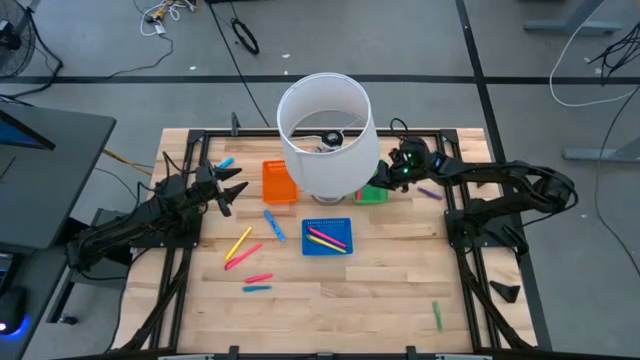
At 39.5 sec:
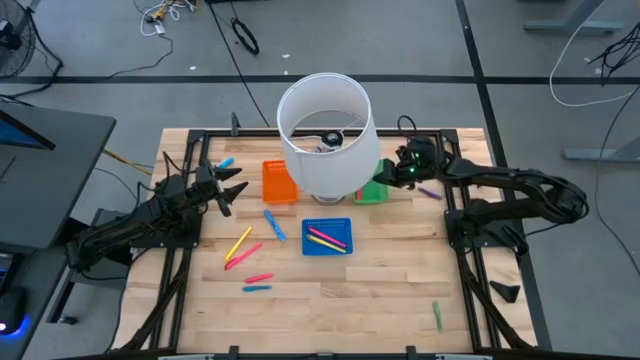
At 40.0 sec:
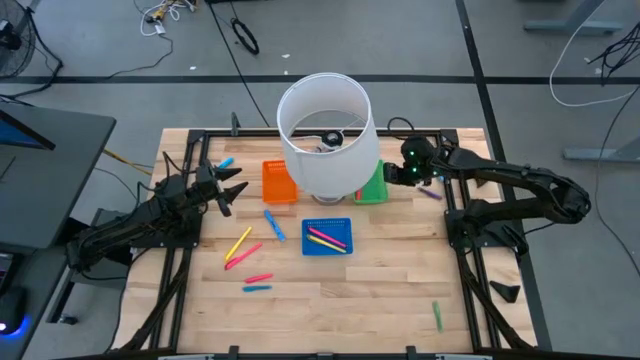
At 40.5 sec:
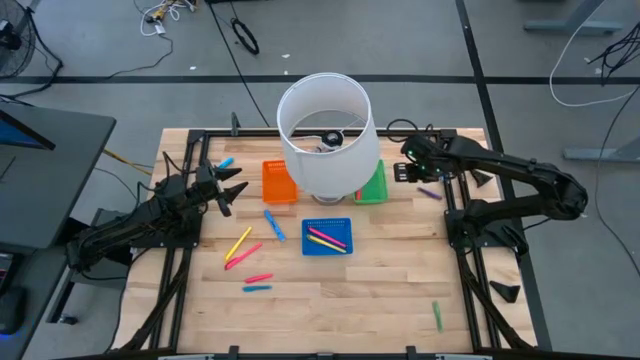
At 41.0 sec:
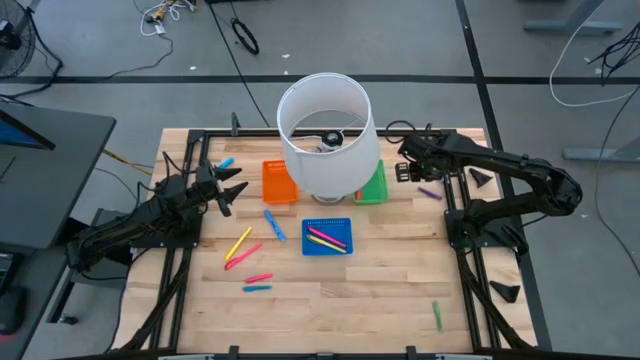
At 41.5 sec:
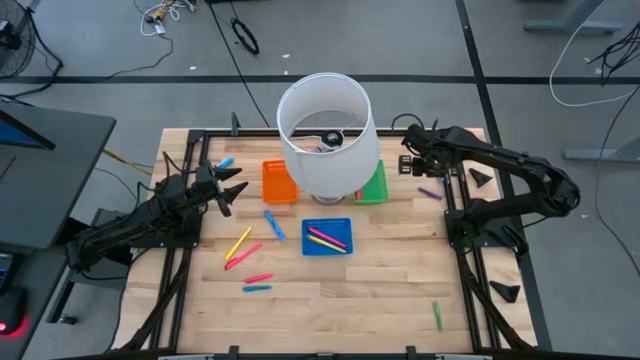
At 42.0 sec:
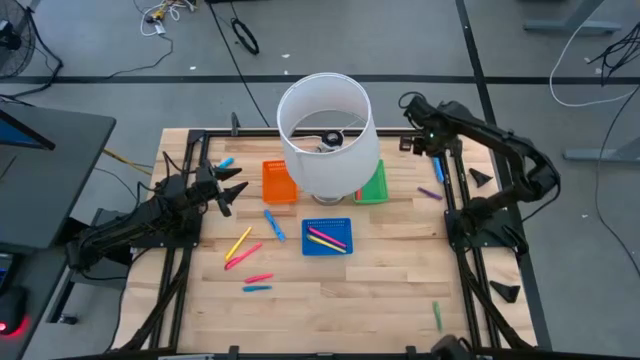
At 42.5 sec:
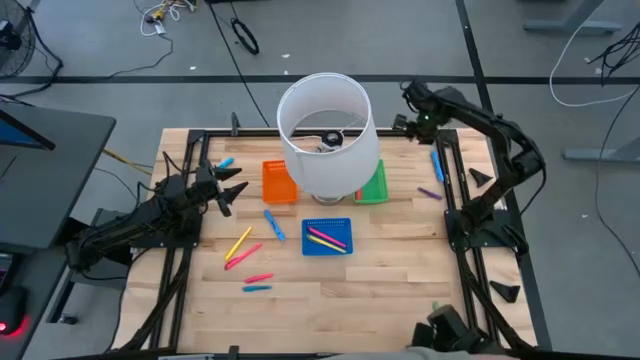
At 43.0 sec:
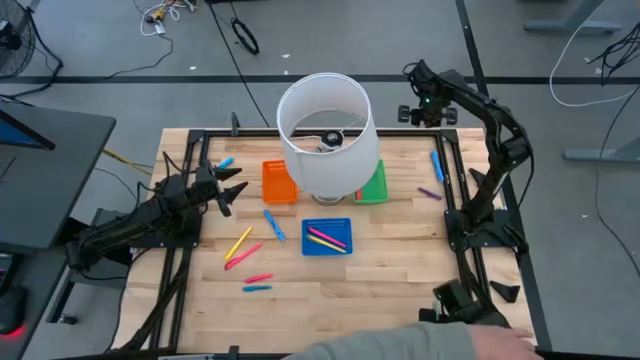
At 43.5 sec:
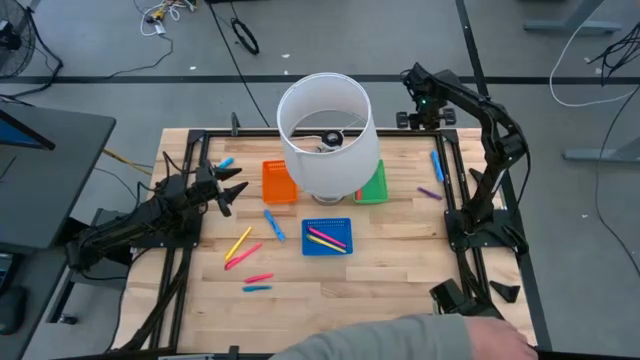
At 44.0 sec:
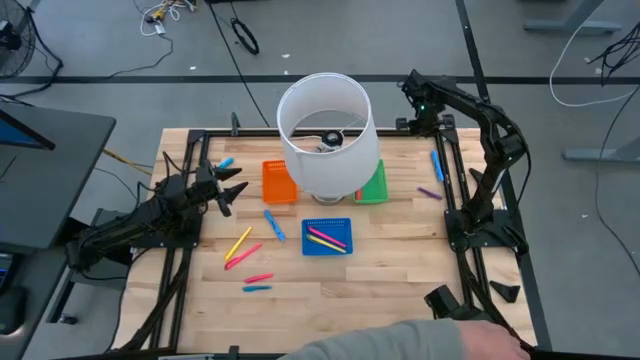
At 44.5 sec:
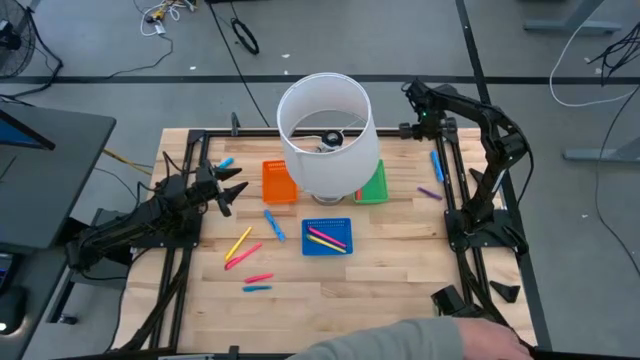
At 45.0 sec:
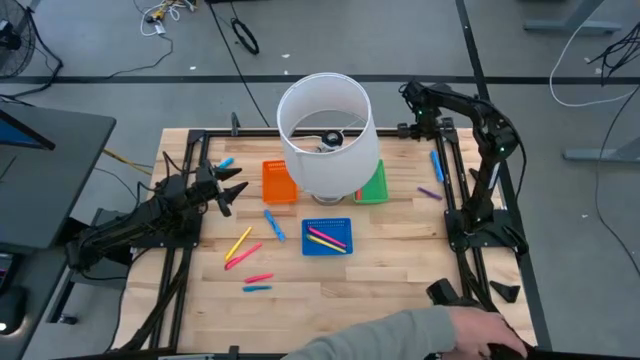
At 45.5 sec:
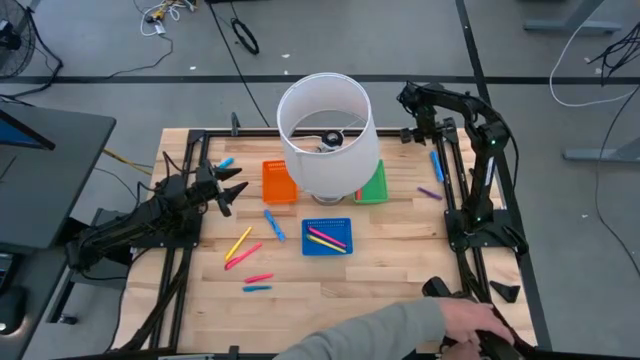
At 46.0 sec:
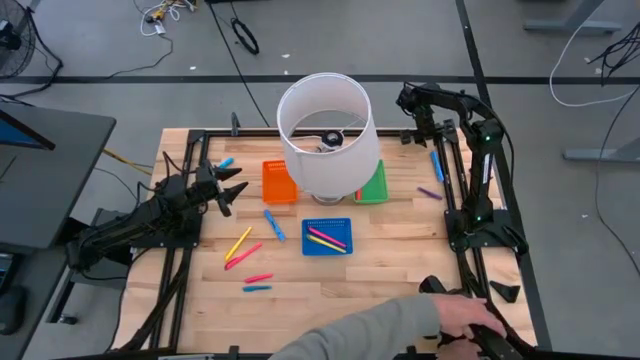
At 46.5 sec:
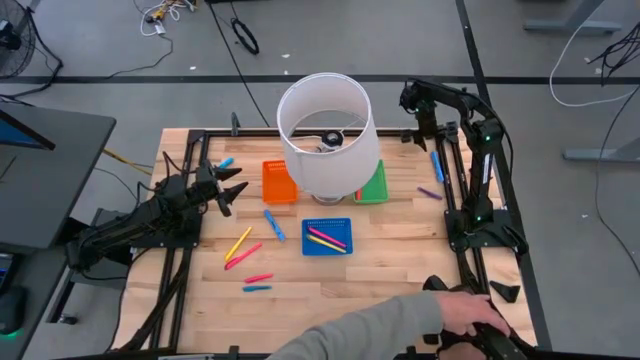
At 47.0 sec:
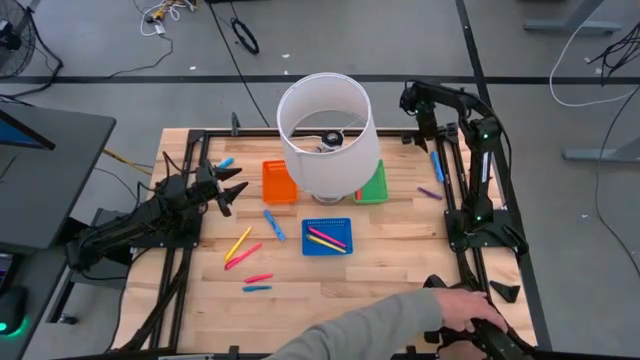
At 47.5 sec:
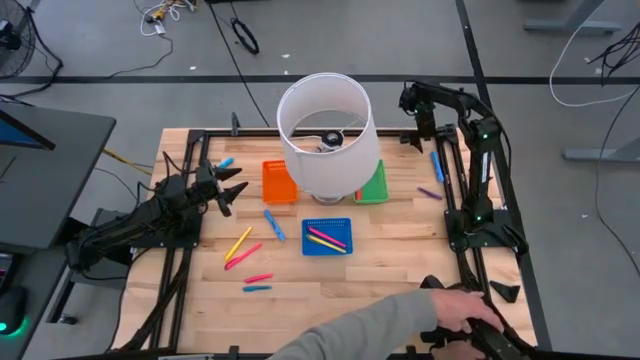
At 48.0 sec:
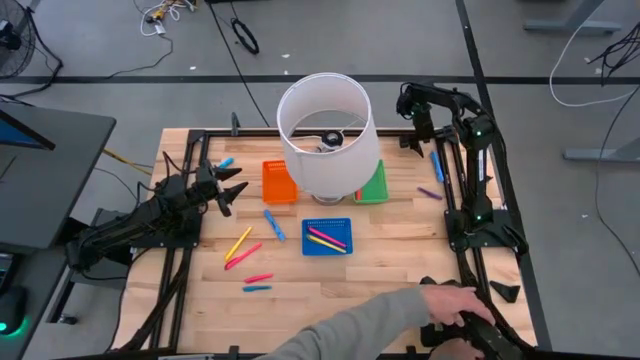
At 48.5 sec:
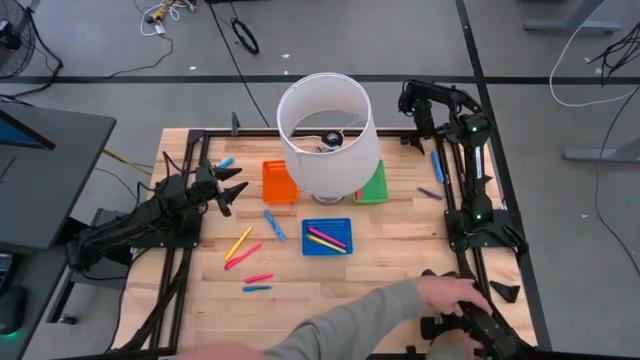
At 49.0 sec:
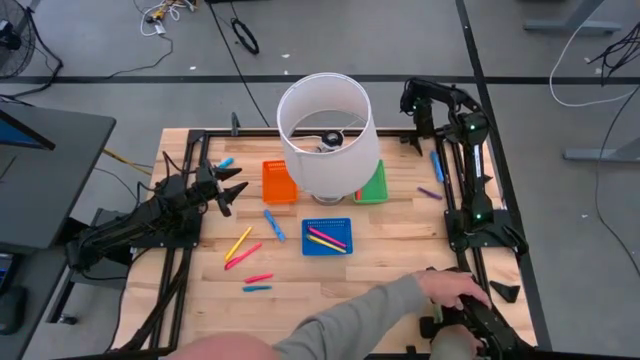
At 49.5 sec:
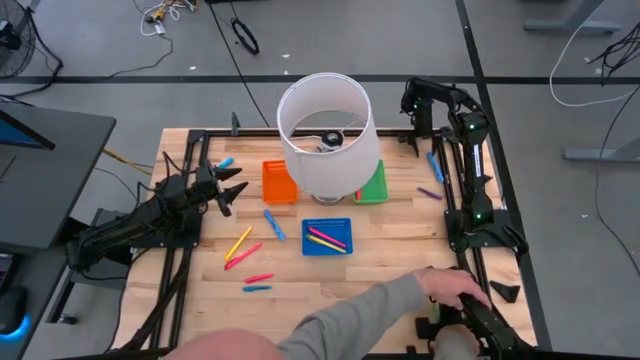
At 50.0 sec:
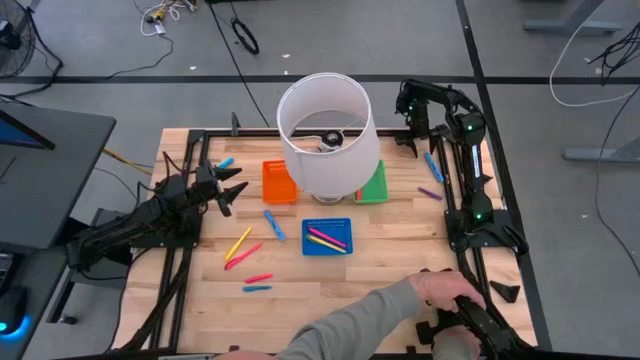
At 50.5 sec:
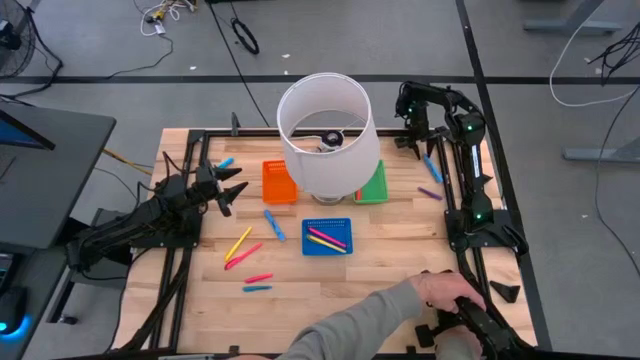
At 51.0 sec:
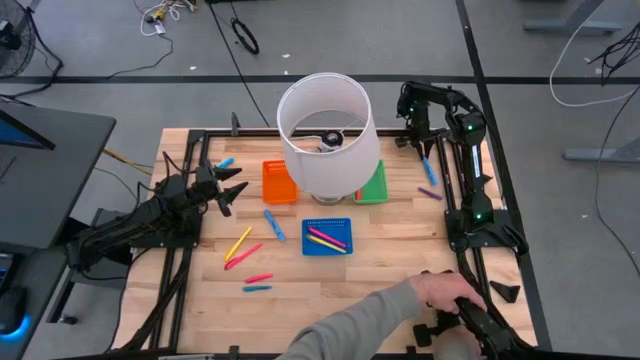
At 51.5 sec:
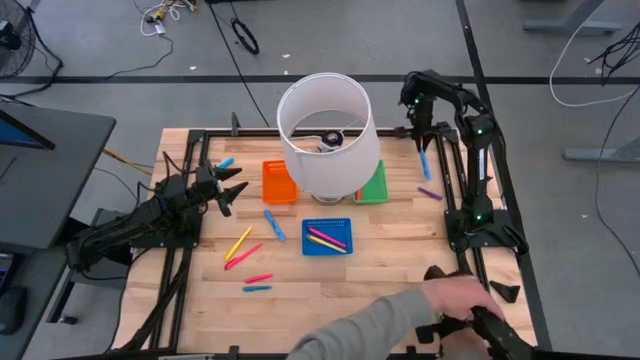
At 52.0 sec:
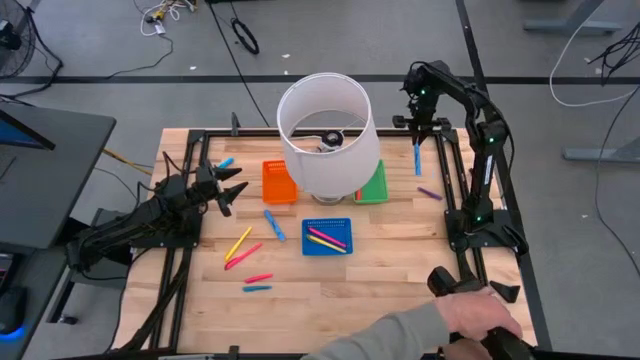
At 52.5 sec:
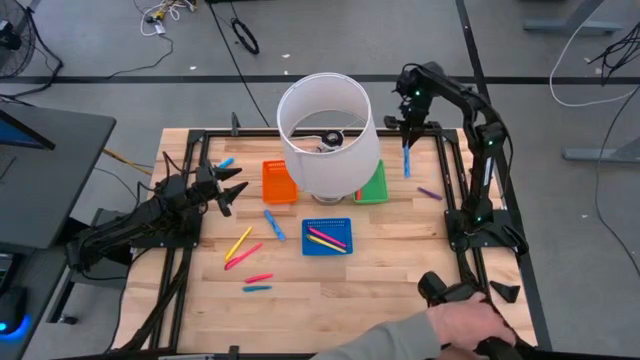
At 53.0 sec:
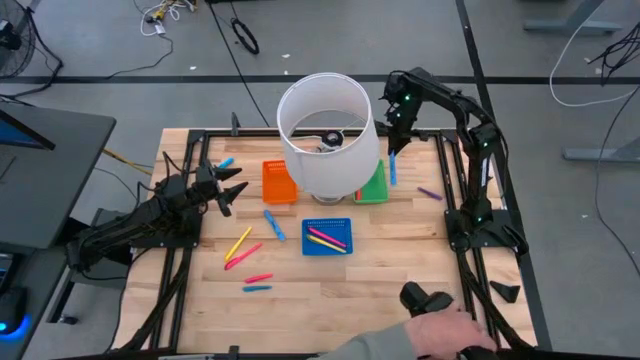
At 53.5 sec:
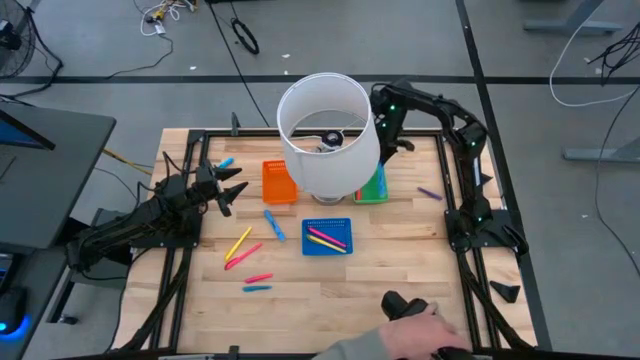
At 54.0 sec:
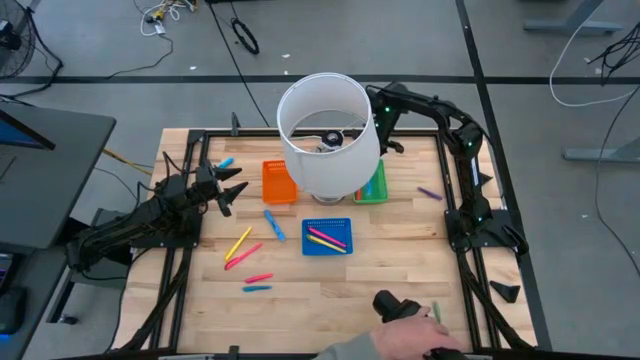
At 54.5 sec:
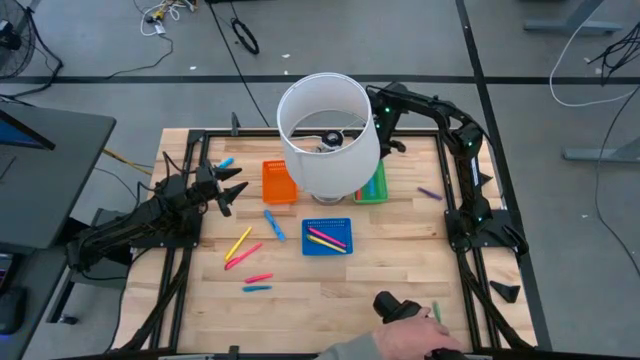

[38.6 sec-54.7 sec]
Task: Pick & Place Markers
Put the top right blue large highlighter pen into the green bin
